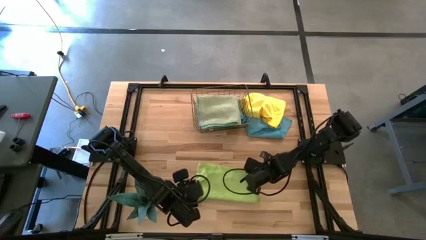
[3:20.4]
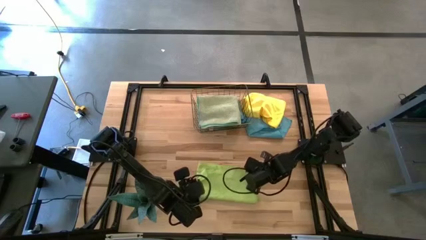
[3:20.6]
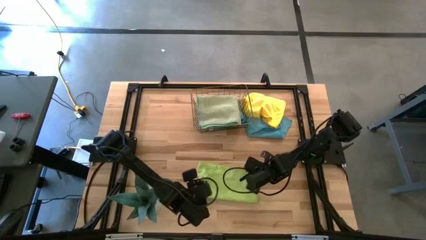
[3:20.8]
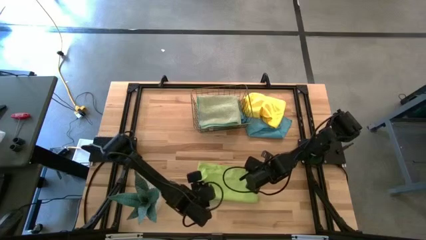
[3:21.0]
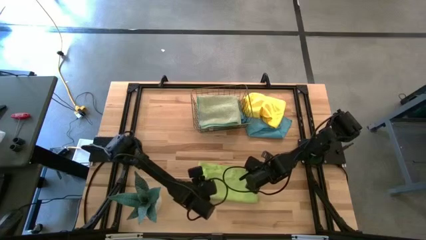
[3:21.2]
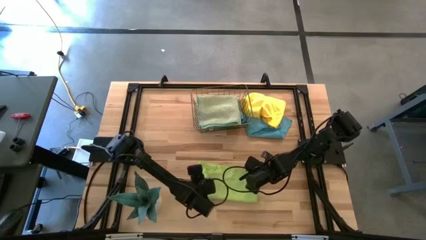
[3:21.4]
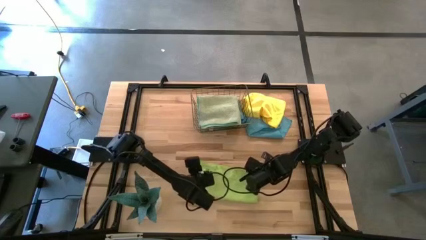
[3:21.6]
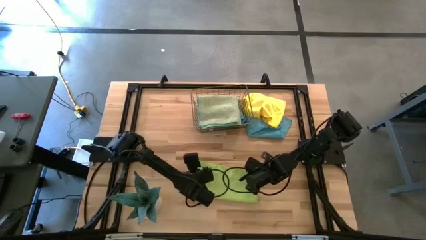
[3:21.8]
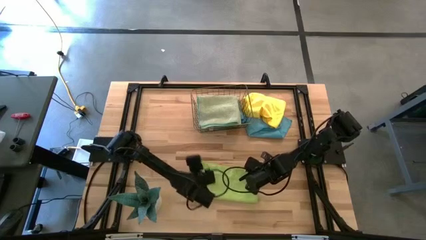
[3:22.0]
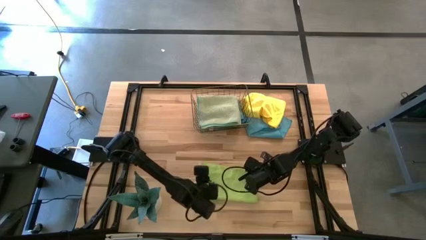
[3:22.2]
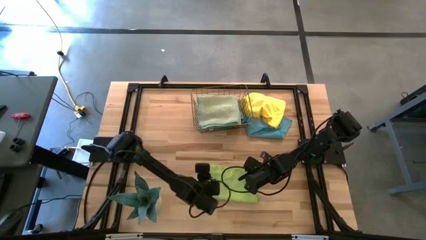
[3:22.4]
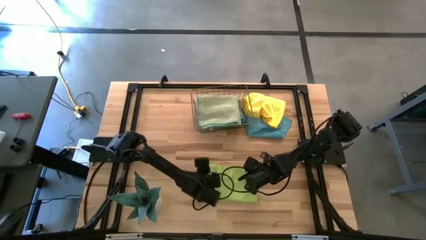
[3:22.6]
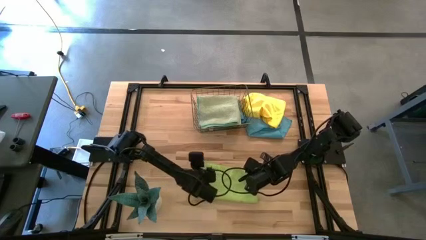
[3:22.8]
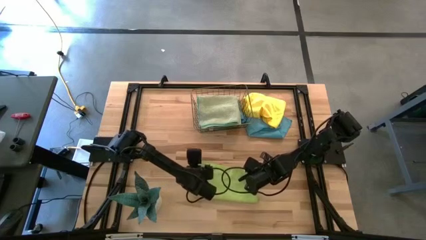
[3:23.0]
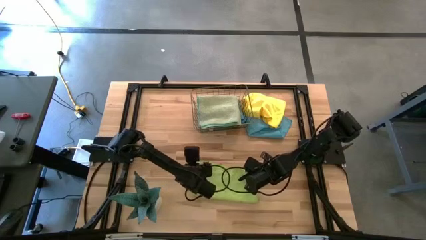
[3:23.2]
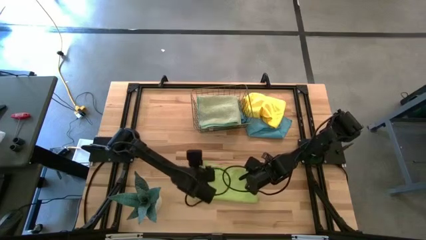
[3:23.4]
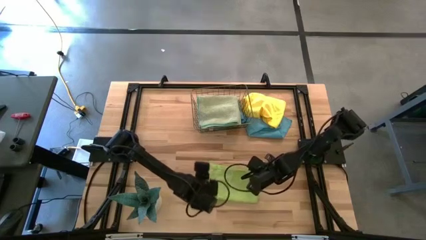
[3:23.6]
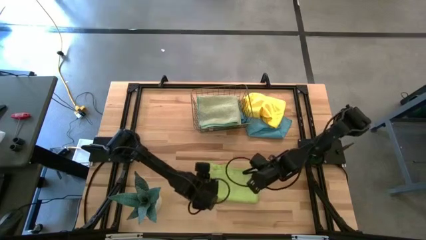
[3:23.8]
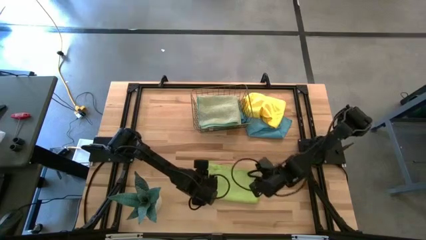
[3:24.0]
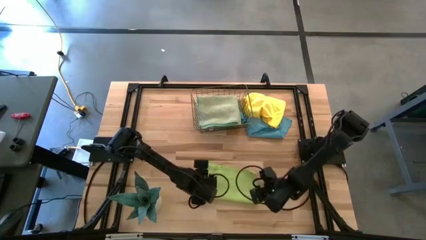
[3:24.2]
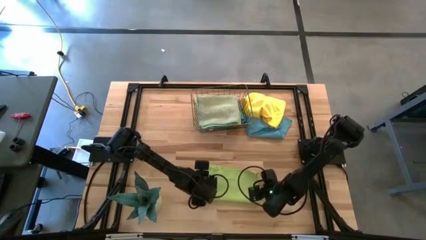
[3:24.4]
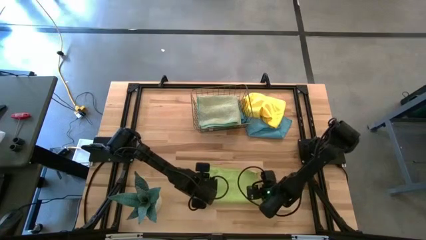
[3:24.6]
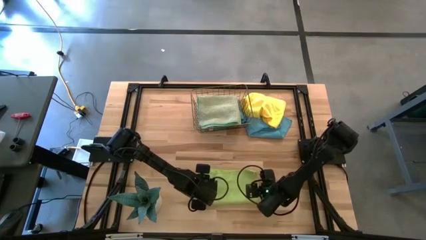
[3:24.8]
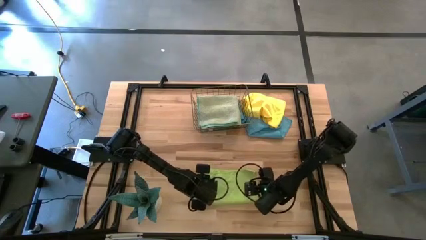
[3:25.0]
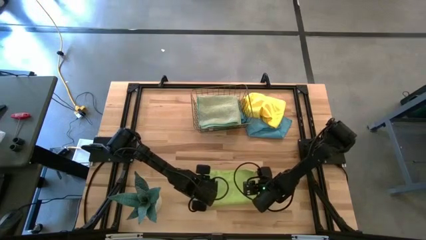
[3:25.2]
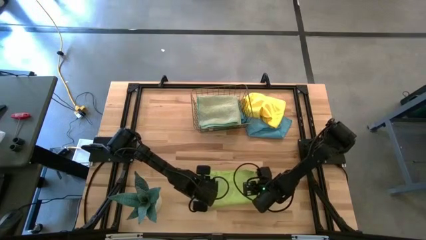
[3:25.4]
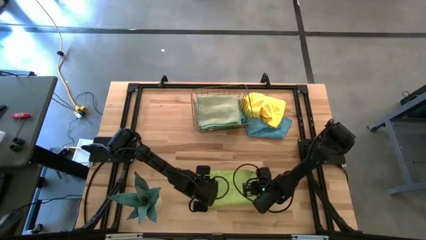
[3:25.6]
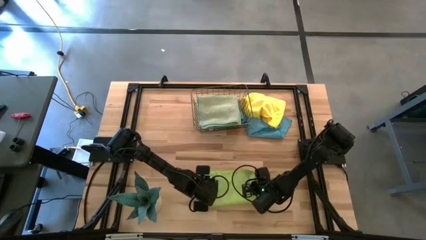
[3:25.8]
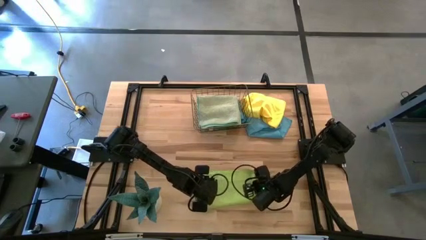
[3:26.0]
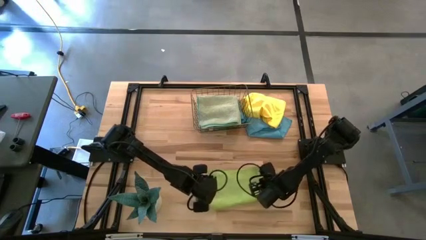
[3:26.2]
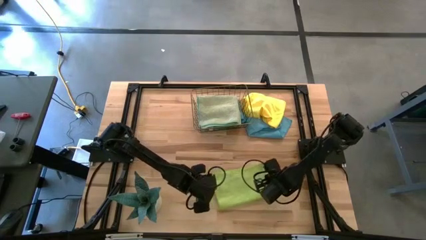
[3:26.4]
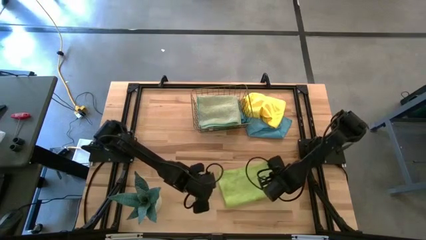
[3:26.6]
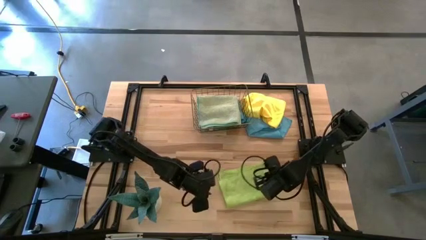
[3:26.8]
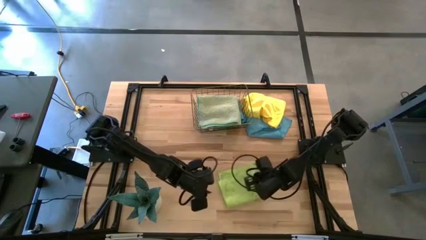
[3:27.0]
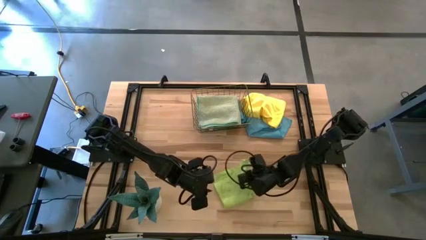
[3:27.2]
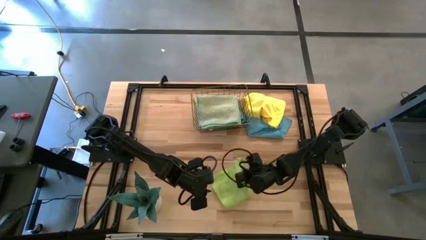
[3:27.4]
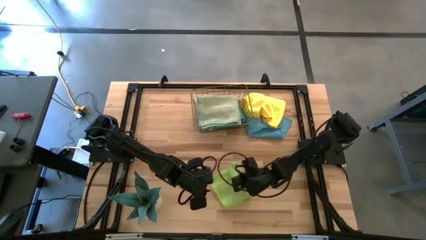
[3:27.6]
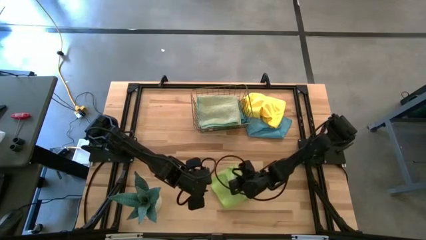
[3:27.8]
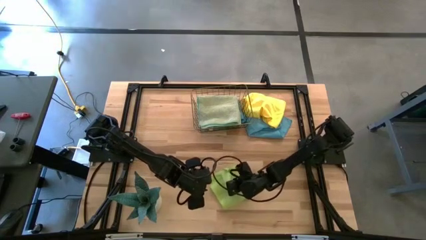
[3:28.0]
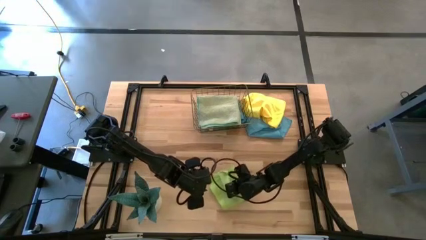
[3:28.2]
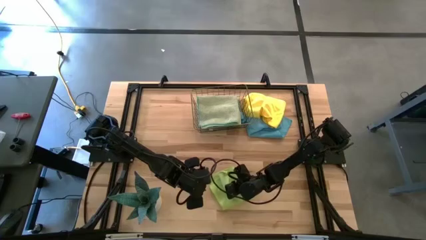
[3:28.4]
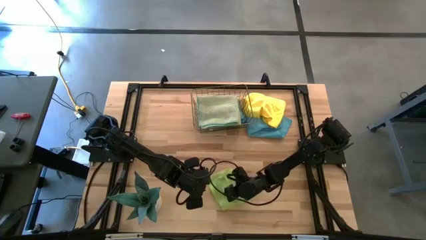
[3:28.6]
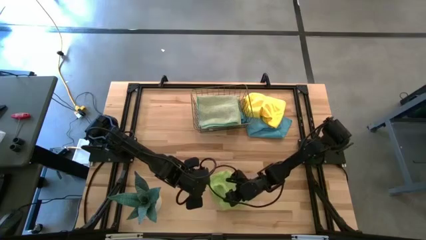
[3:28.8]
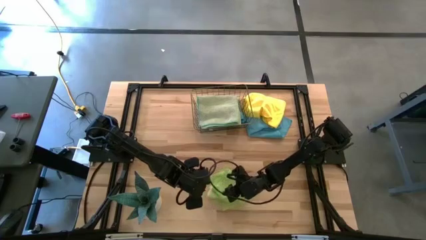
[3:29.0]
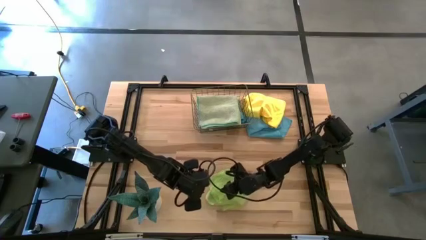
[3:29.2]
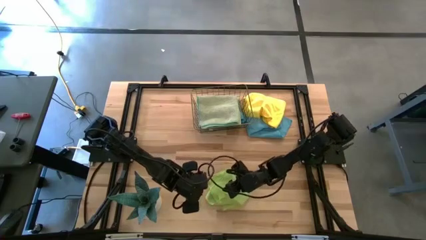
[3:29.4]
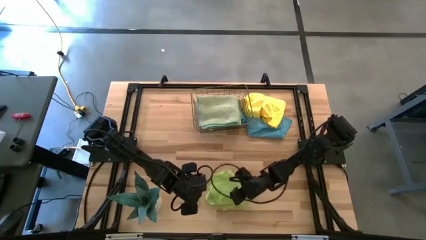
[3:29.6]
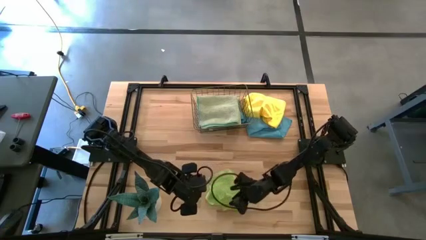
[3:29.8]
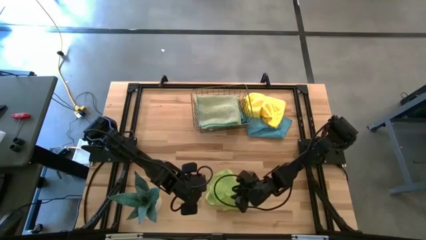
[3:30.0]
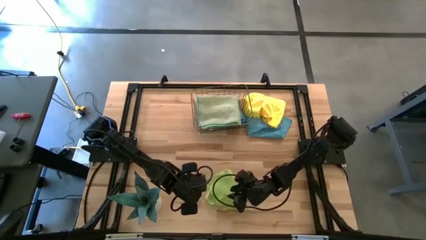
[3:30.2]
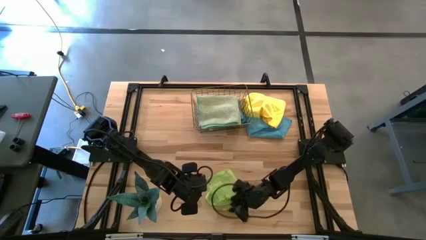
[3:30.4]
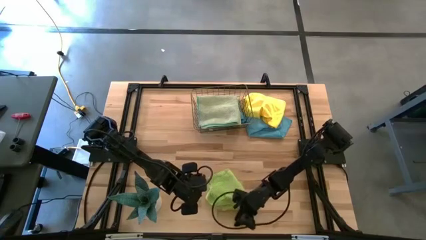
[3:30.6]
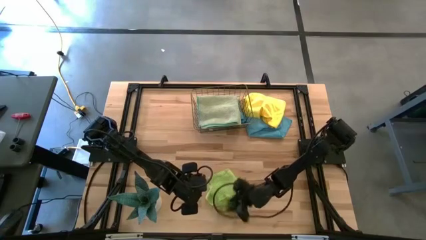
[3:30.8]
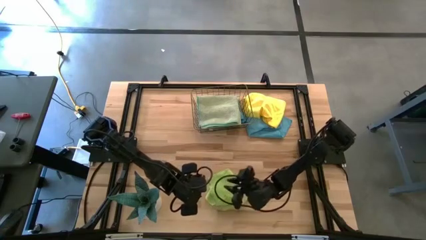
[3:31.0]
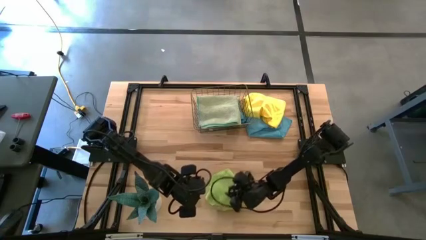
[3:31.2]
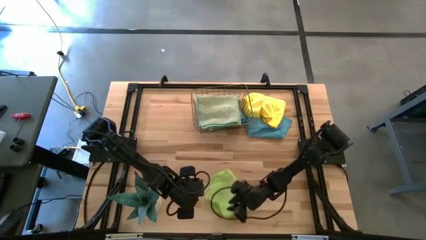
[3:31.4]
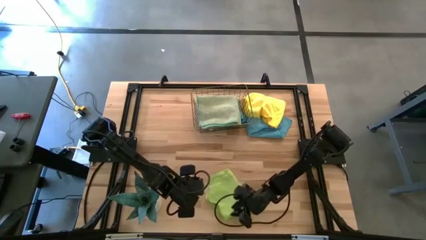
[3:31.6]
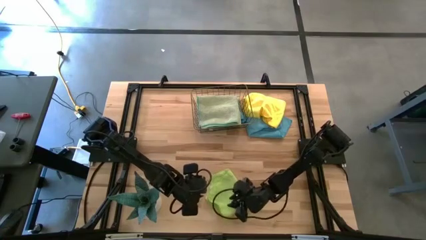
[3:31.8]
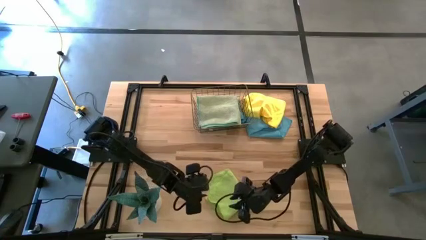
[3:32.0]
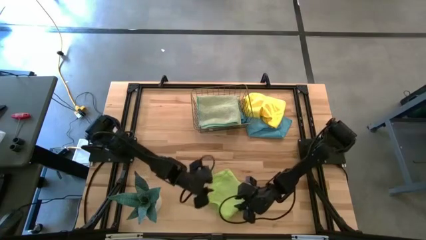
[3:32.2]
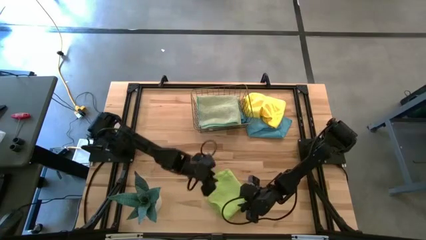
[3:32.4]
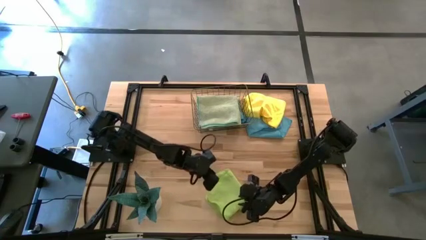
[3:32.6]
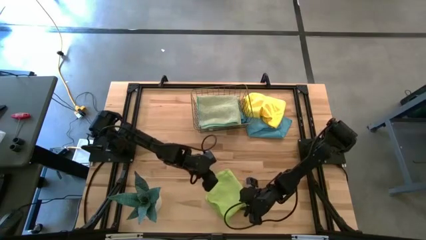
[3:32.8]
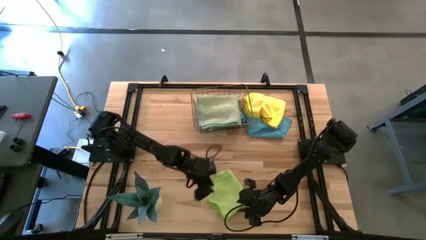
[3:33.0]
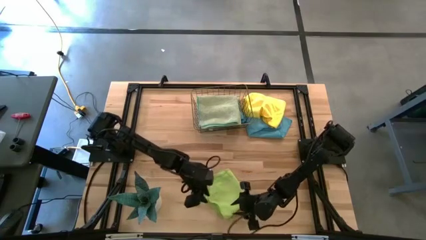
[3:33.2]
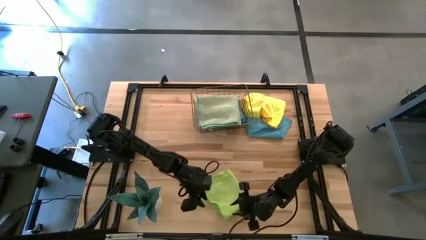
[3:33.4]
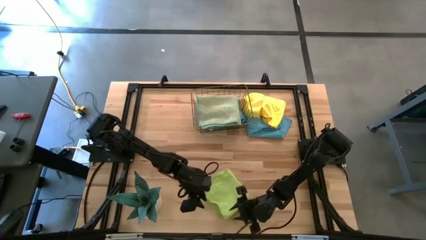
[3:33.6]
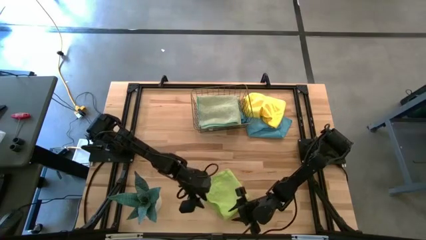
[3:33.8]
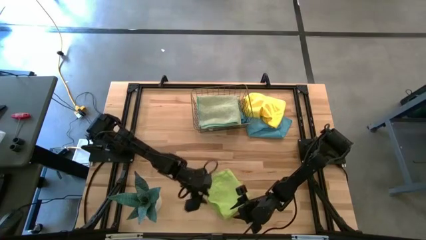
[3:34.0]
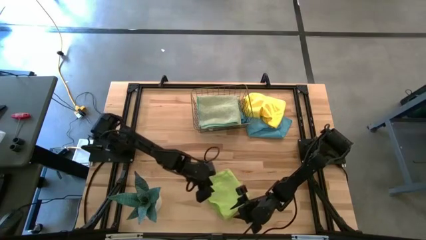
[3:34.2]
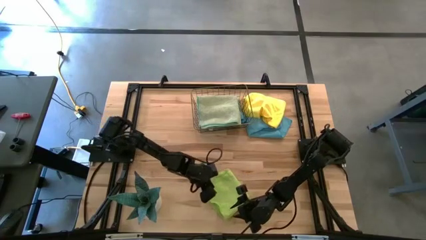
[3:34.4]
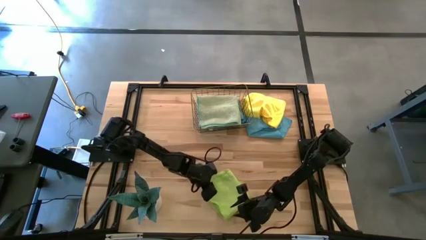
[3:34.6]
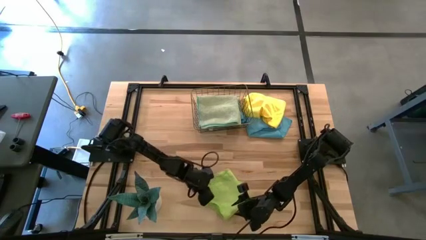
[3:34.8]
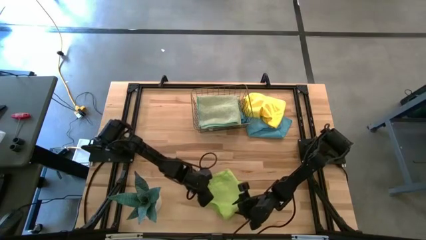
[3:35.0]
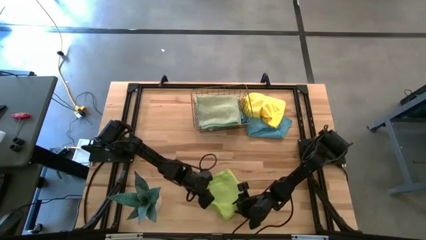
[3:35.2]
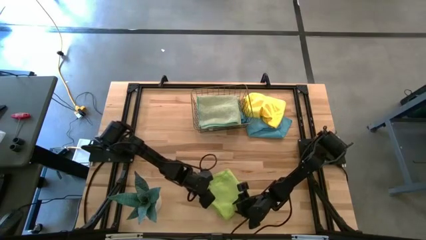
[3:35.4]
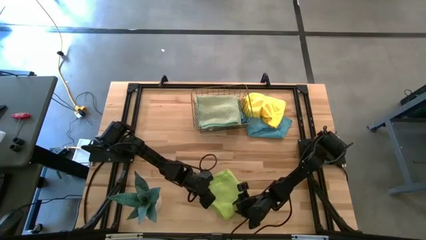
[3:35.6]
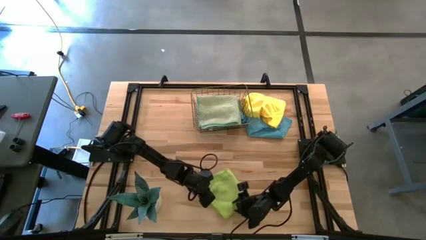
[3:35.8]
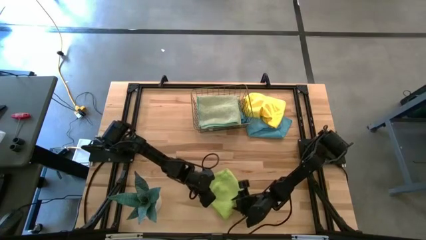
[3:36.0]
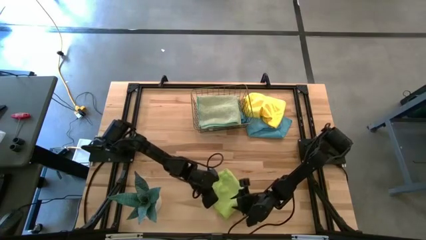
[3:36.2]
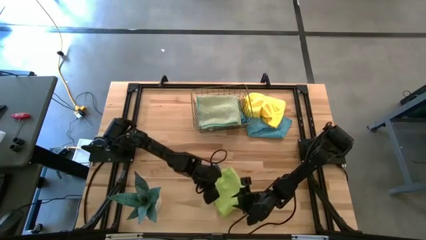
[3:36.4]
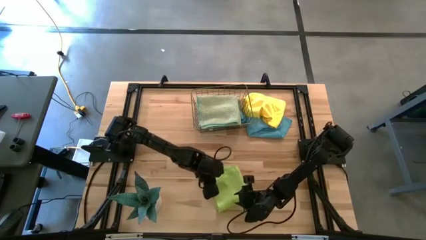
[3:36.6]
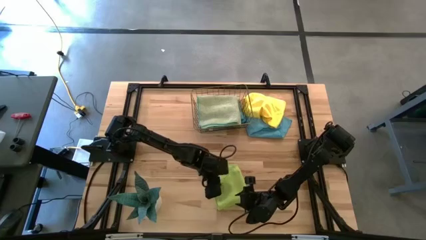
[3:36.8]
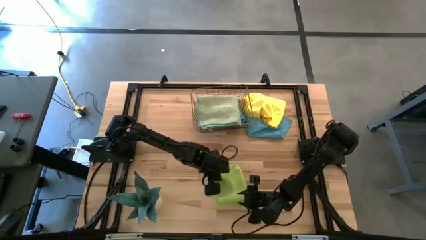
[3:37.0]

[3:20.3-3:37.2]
Task: Fold microfiber towels
Fold the green towel
